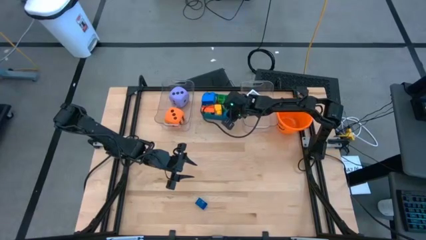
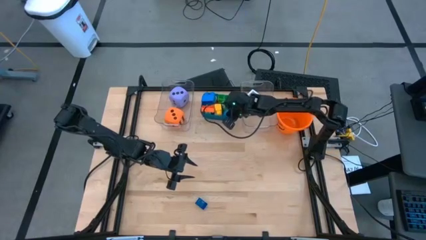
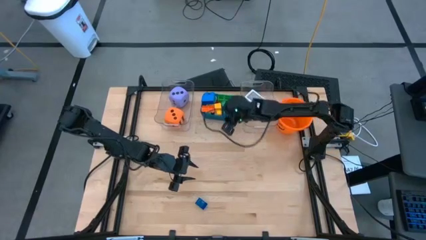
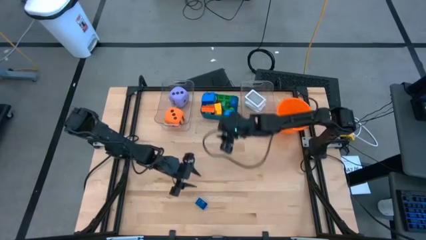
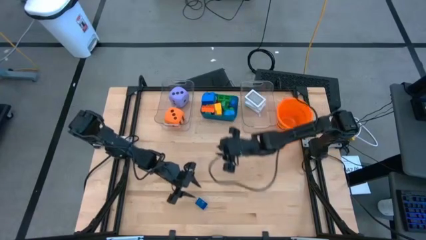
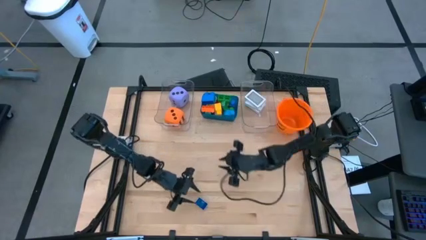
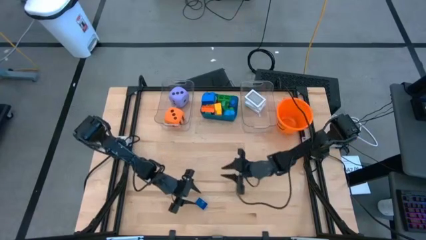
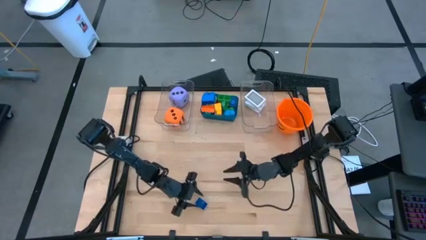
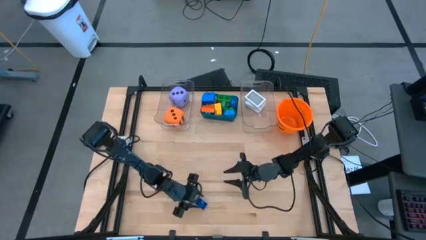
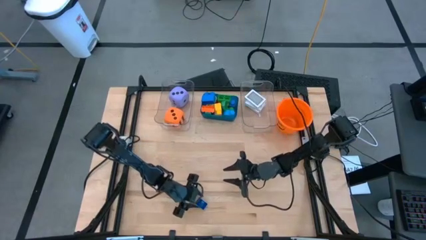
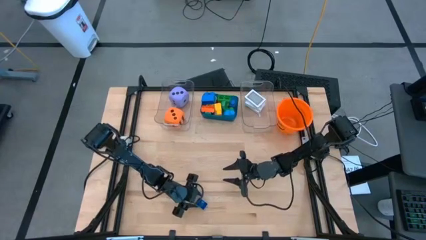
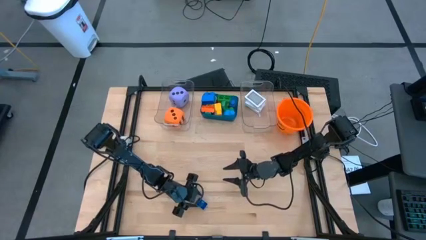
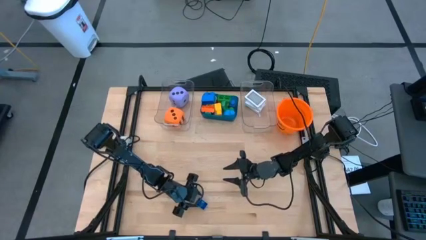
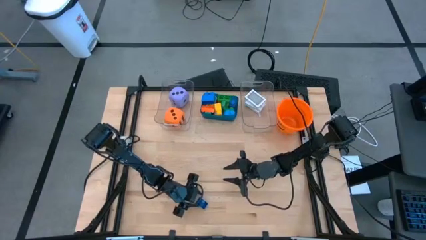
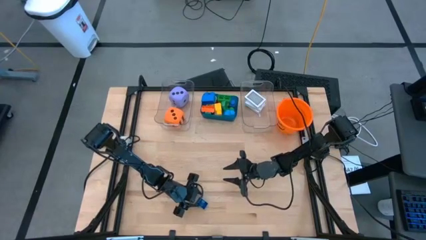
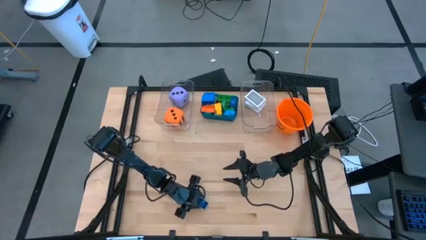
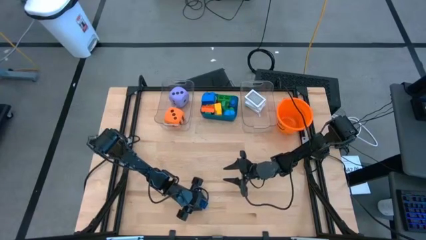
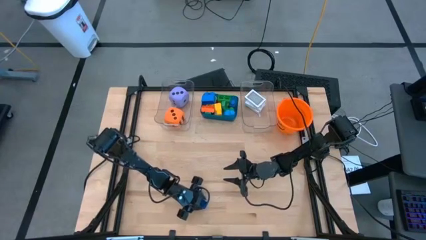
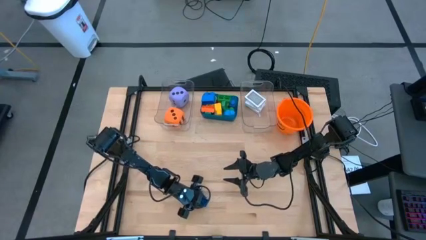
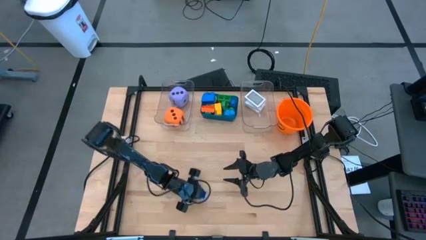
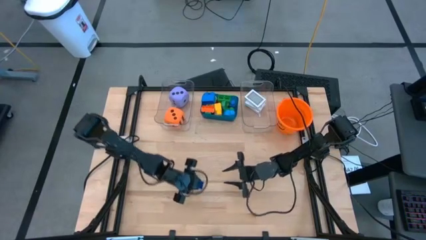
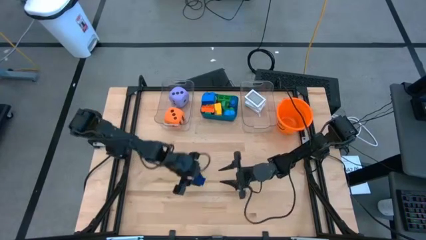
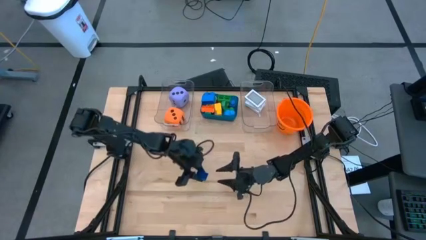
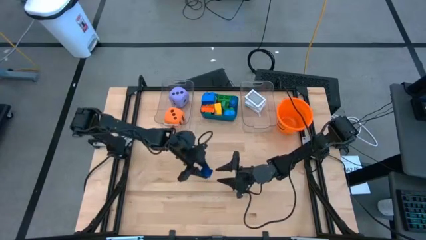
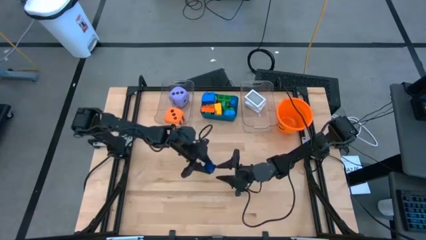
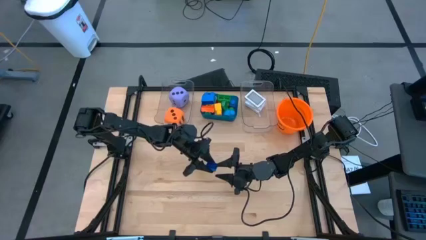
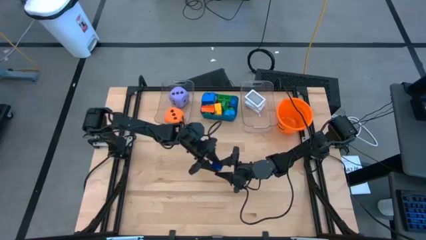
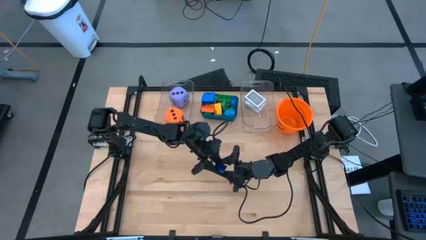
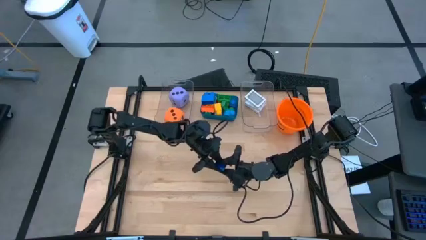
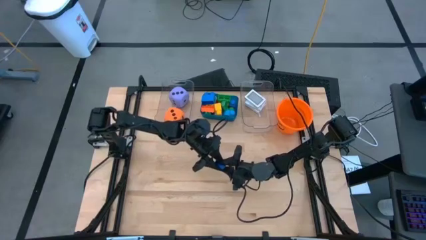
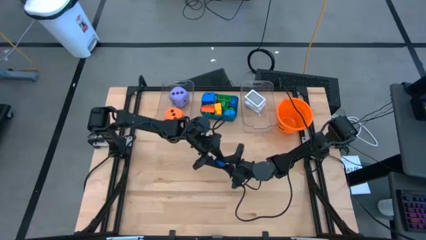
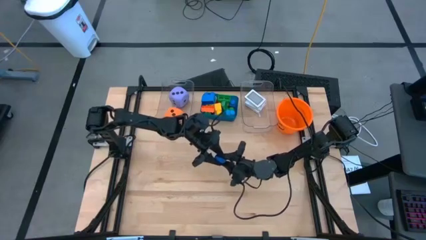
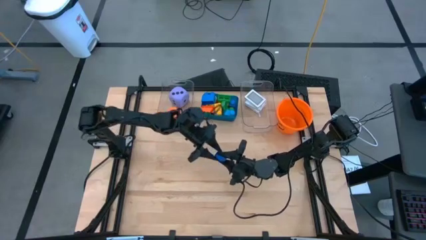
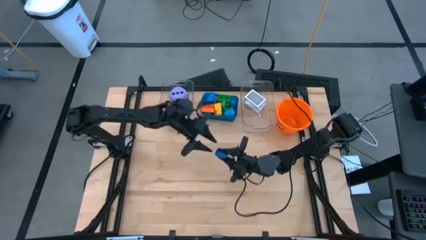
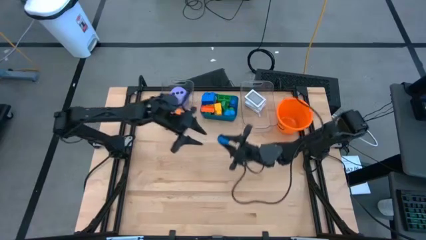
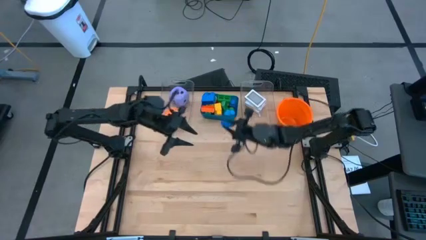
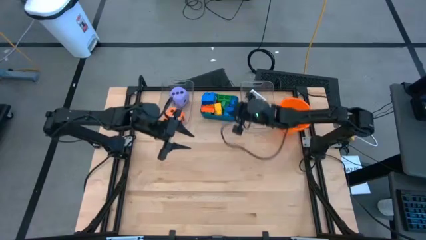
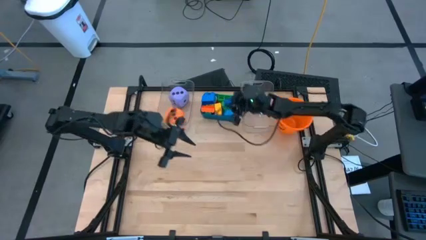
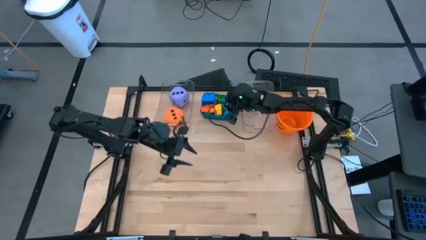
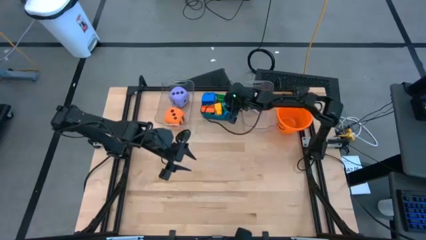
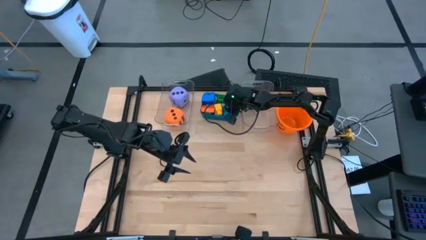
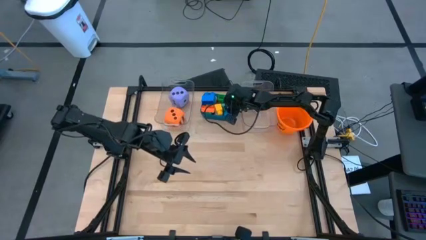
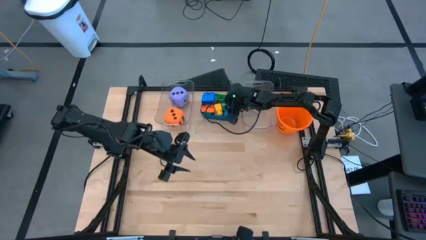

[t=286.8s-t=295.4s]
Task: Pick & Place Toys
Put the blue game piece into the blue bin

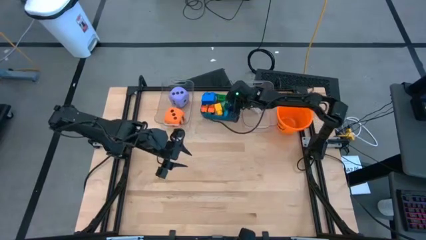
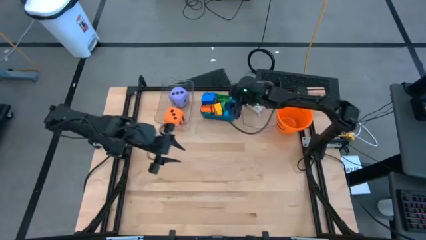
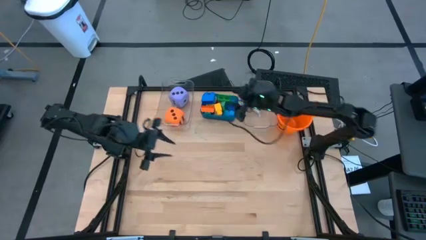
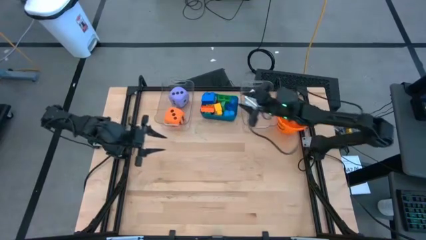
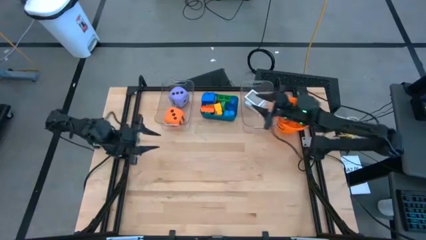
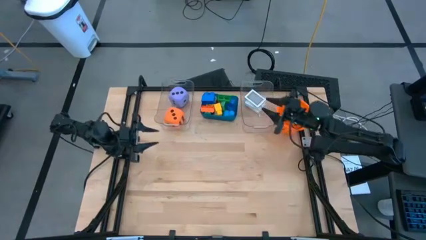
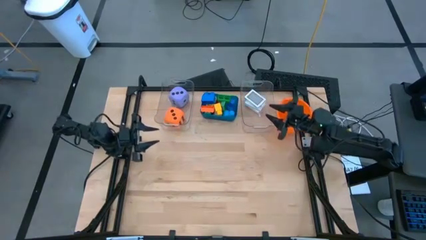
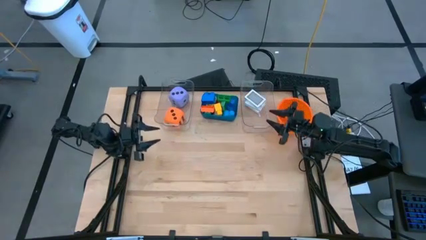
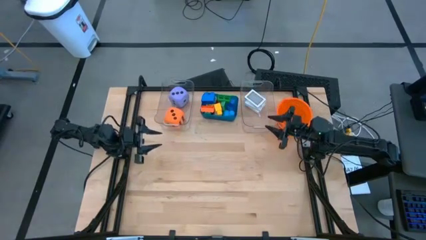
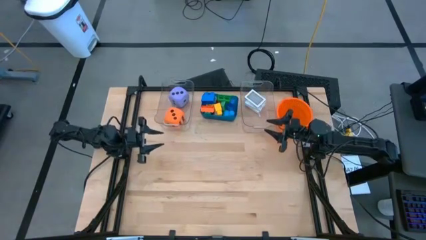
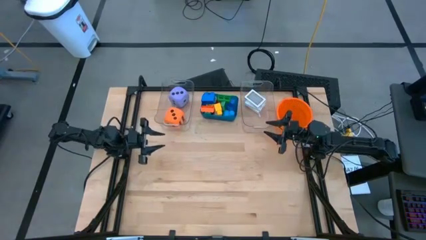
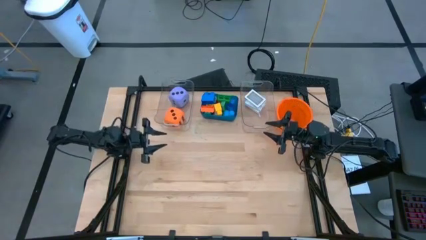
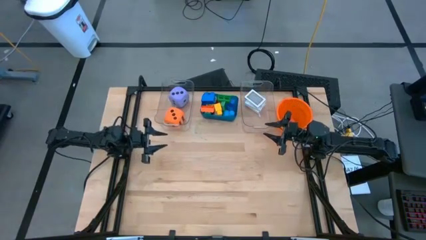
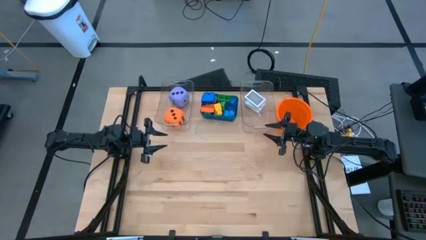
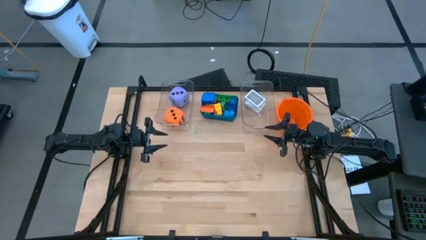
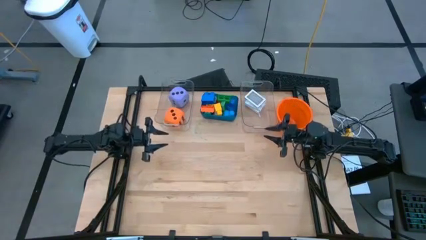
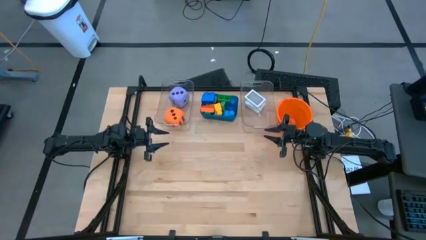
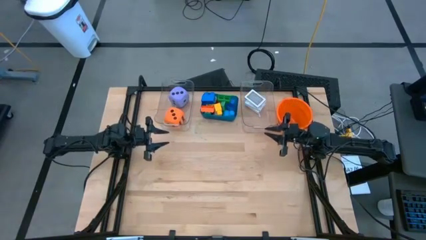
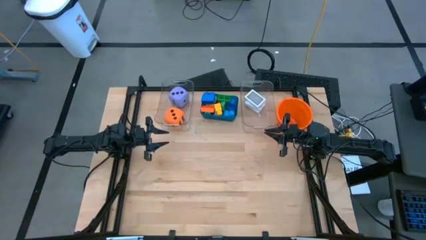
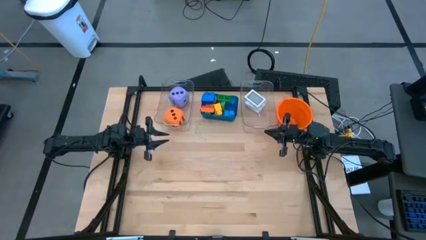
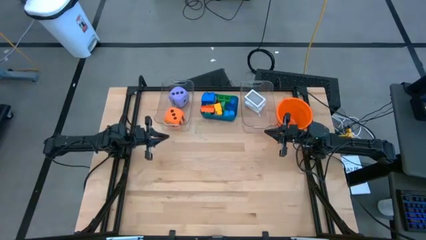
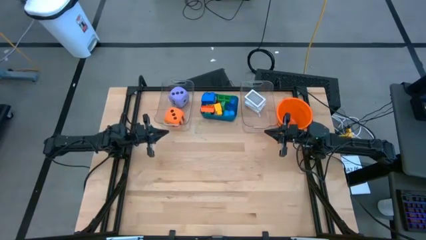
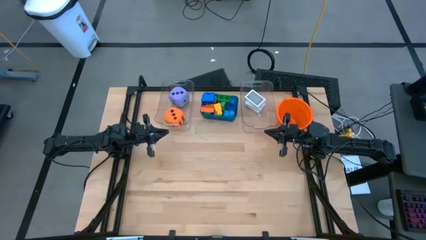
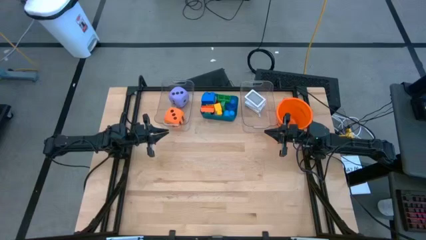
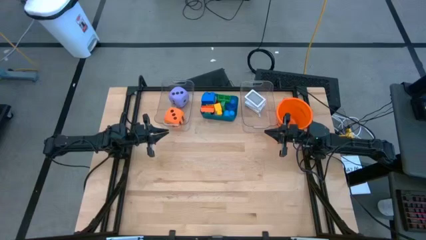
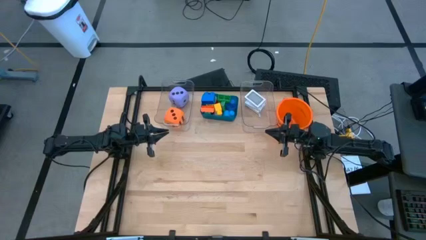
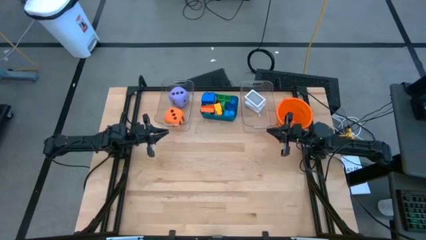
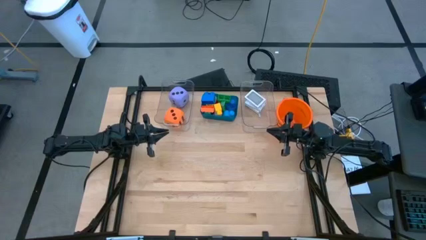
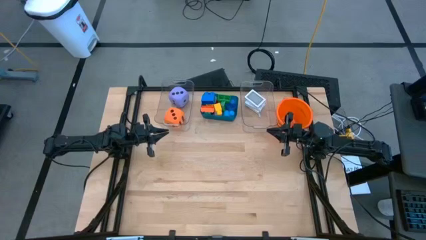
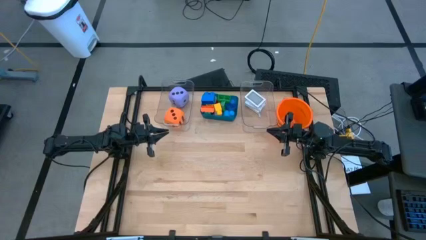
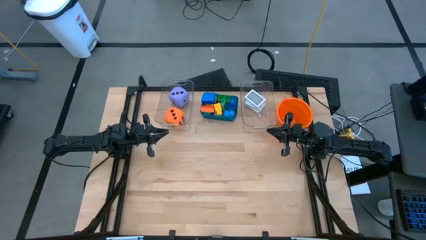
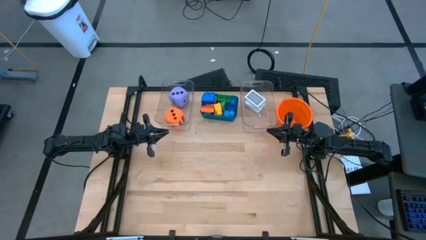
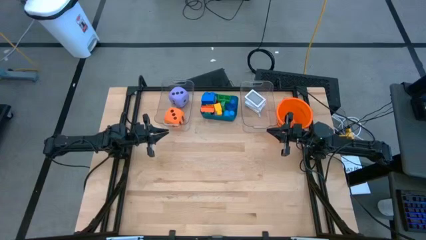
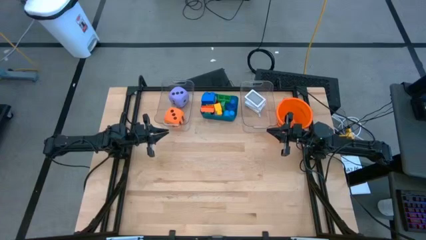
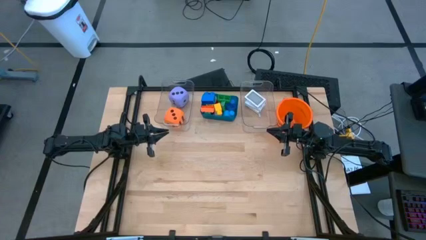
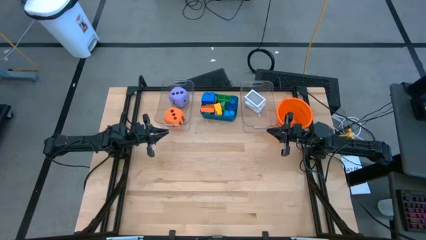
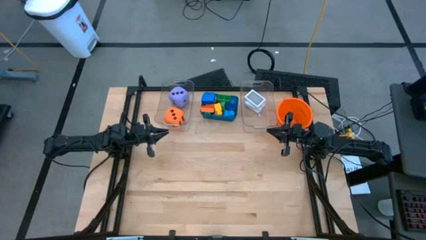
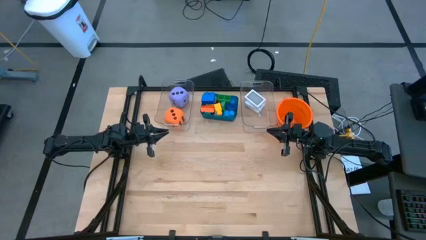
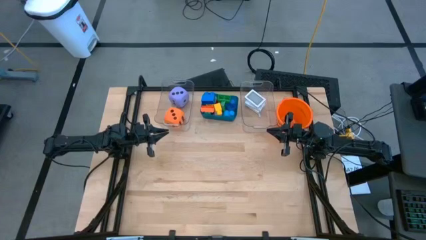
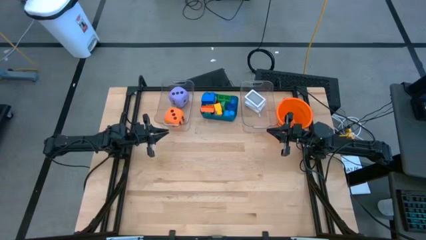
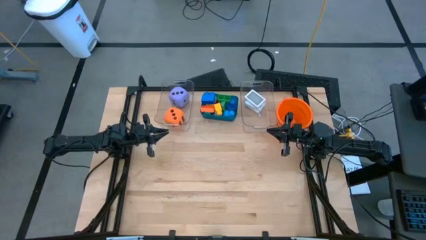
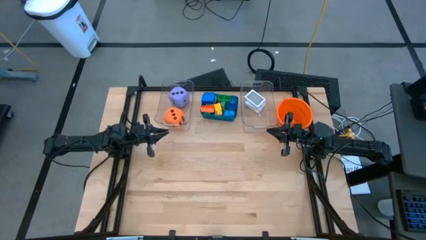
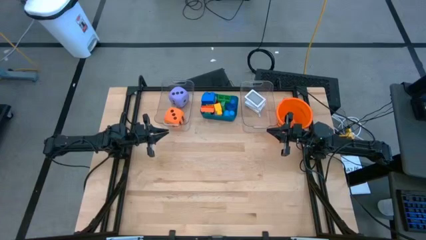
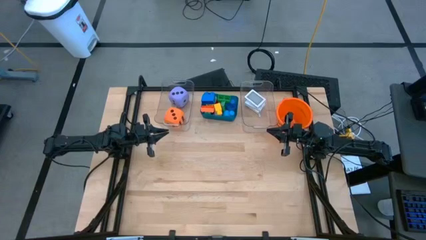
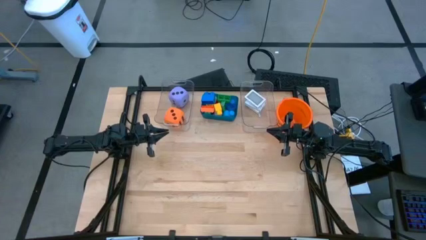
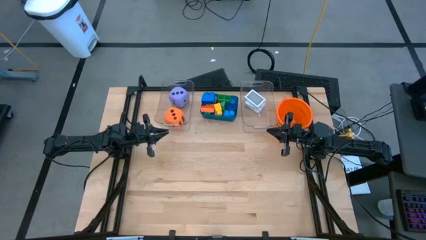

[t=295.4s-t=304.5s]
Return to Home Position
